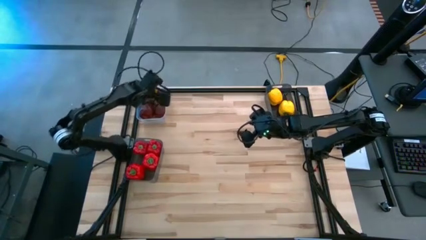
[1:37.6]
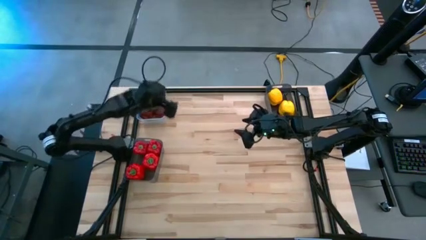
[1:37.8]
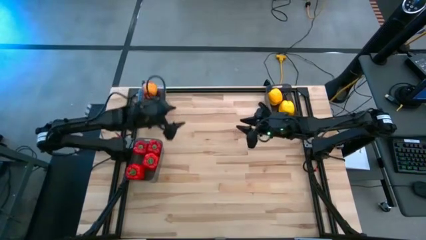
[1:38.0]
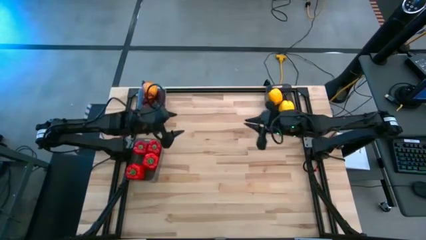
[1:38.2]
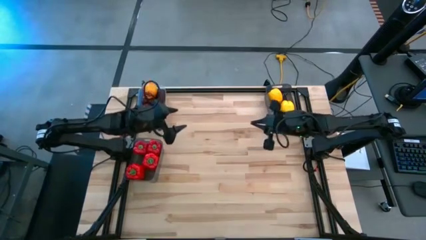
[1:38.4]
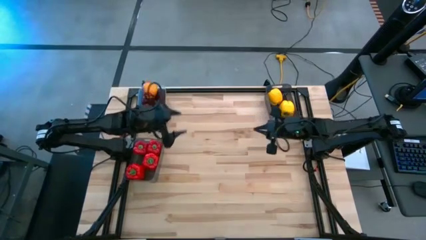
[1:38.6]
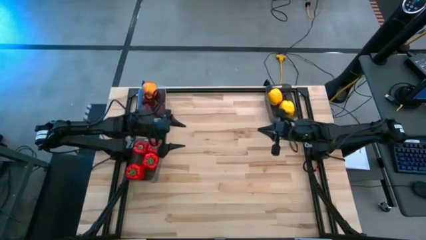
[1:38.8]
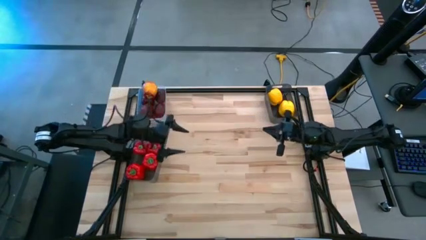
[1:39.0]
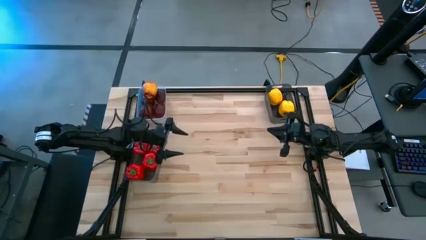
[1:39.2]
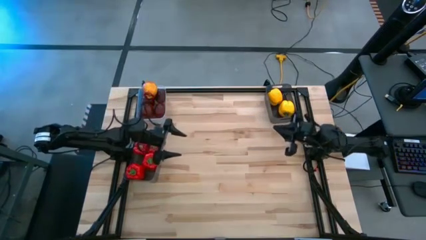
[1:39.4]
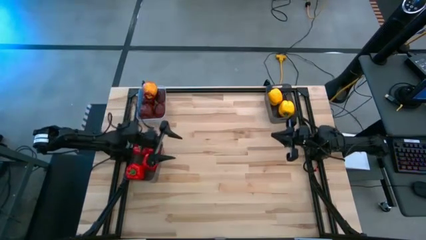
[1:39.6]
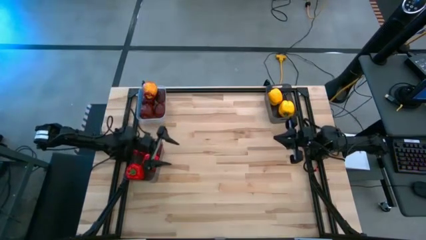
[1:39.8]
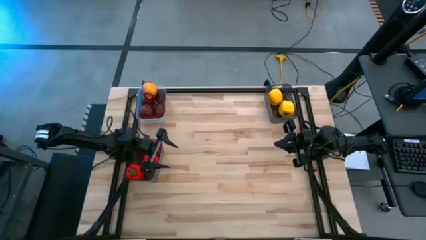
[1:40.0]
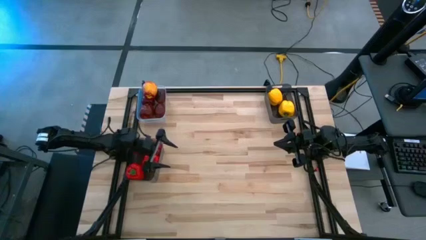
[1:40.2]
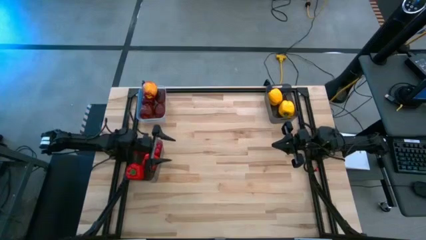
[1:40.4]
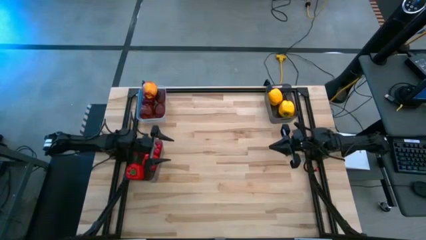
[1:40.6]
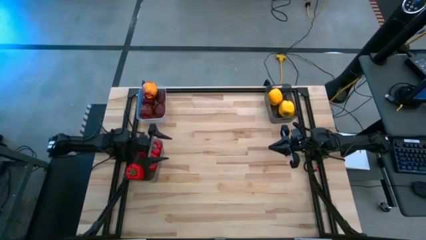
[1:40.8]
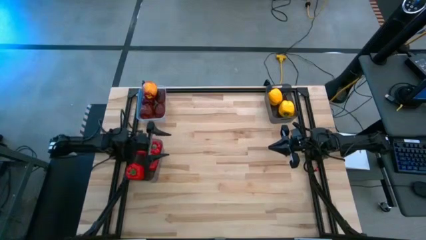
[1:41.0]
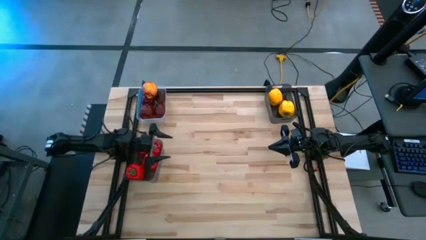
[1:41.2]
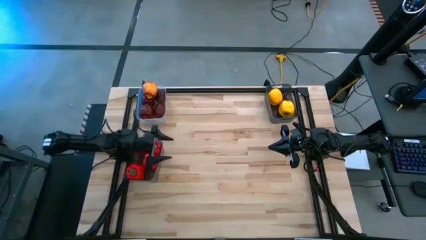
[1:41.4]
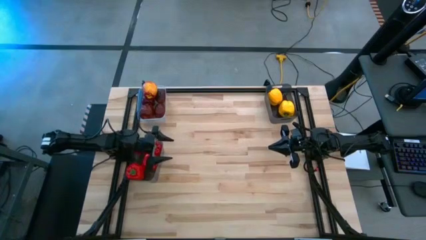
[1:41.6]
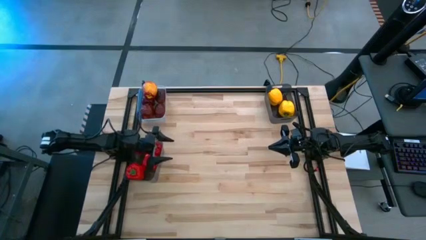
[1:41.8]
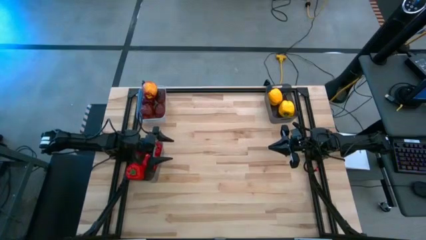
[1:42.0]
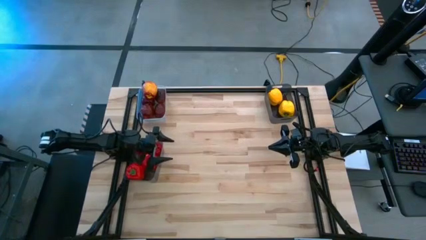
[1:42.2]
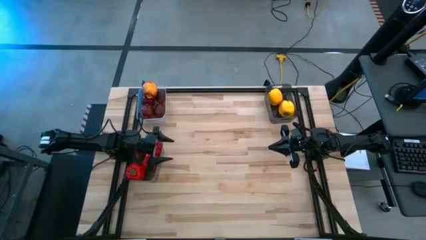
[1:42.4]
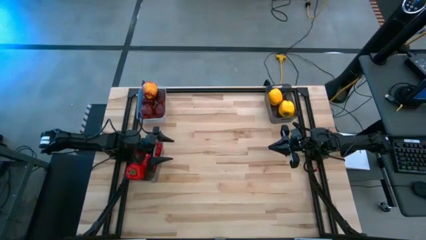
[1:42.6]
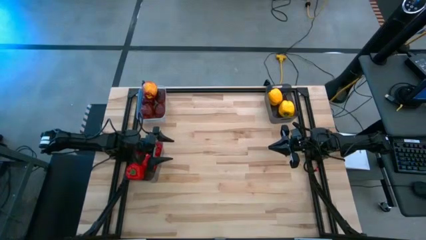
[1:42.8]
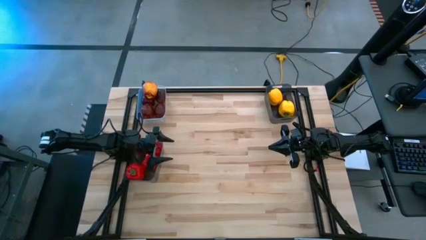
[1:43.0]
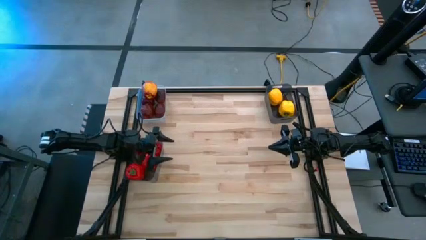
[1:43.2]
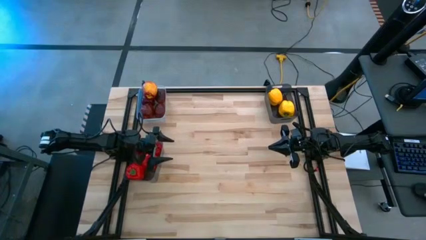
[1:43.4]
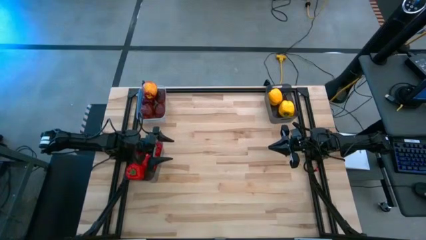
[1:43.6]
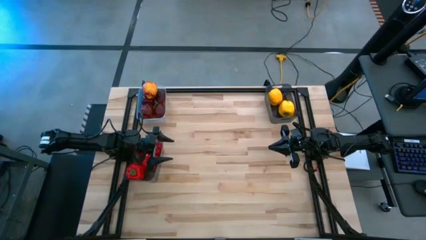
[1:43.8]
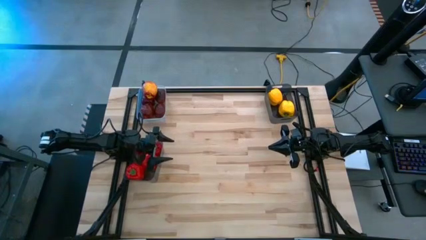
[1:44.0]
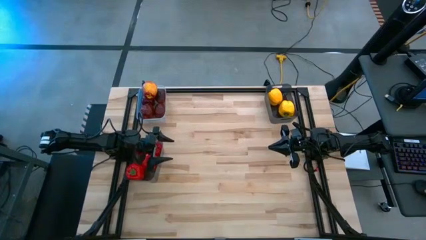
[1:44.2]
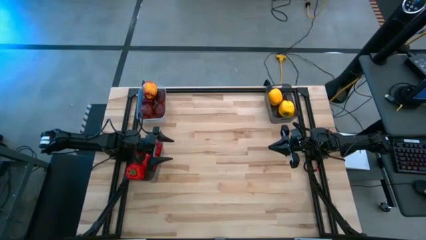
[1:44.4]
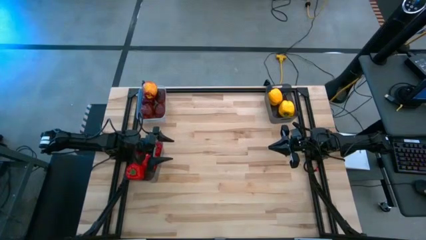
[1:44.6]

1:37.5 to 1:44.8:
Task: Sort produce into baskets
Return to Home Position

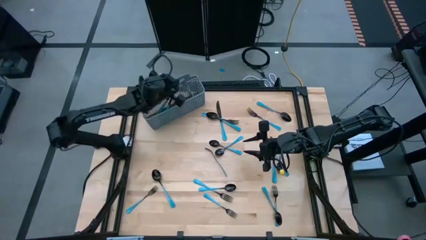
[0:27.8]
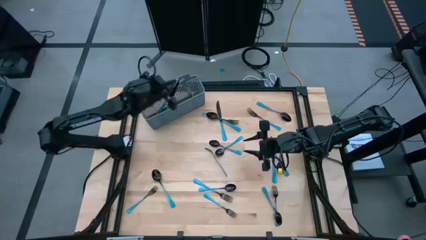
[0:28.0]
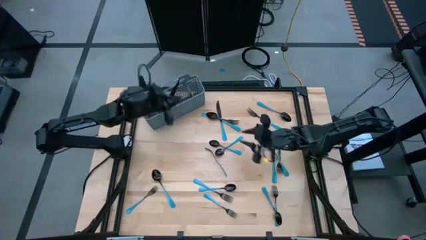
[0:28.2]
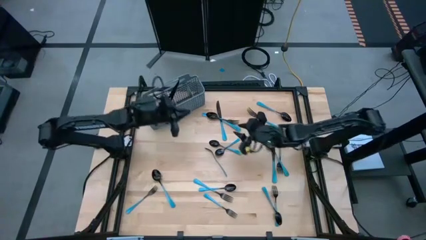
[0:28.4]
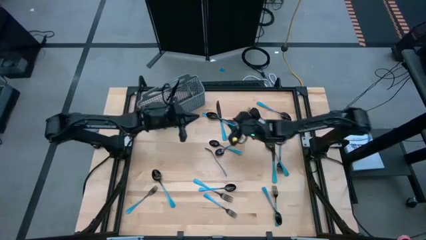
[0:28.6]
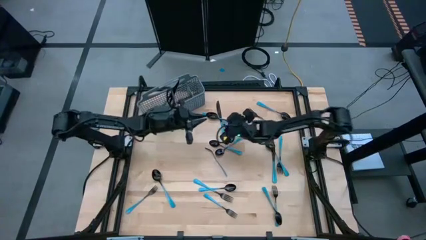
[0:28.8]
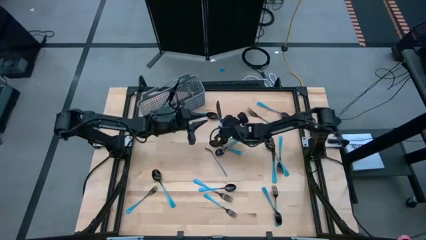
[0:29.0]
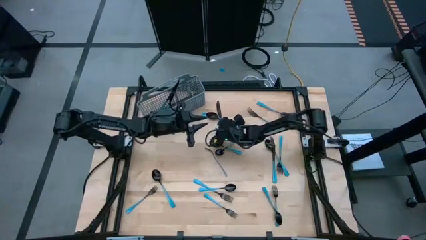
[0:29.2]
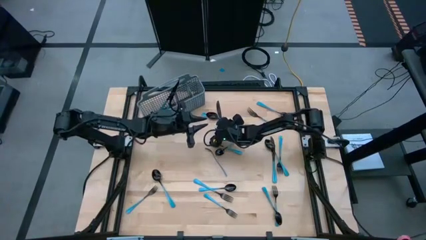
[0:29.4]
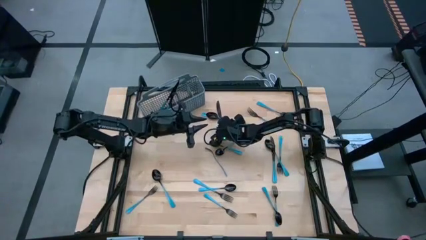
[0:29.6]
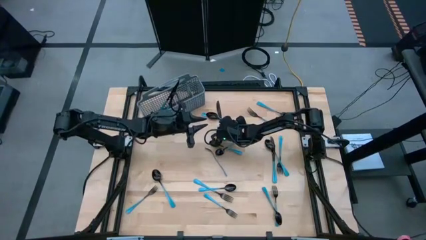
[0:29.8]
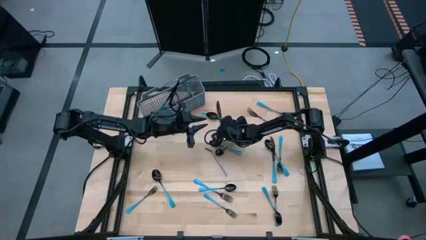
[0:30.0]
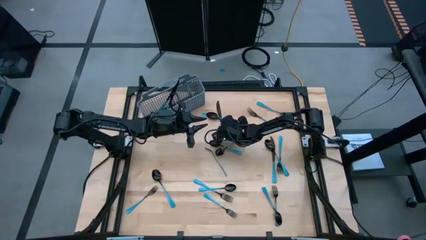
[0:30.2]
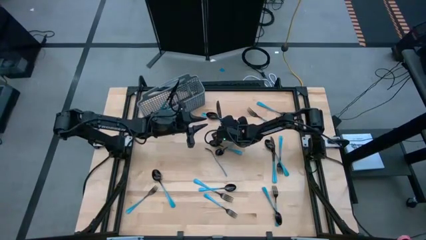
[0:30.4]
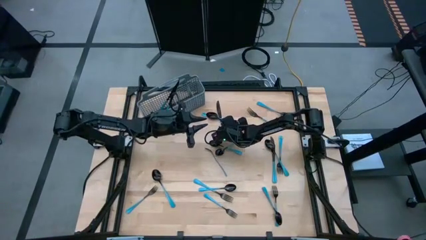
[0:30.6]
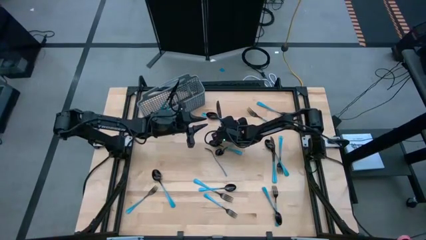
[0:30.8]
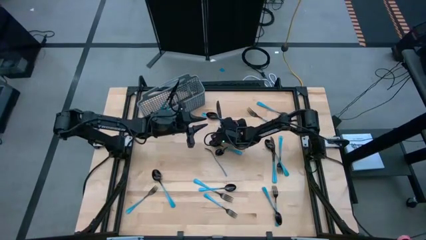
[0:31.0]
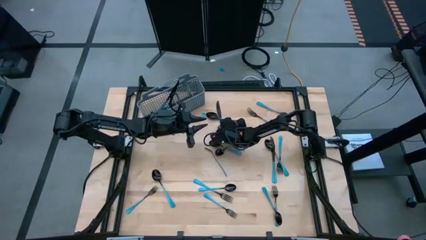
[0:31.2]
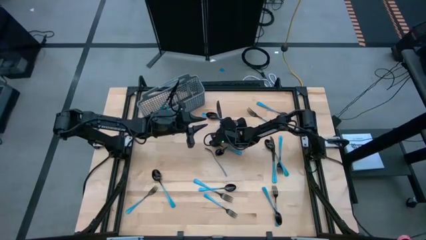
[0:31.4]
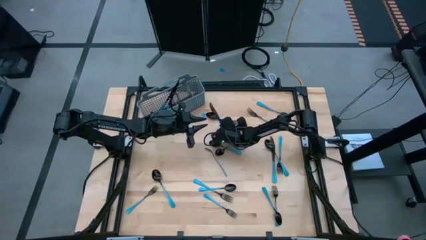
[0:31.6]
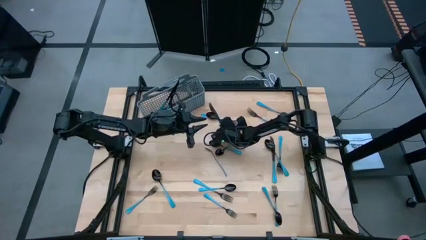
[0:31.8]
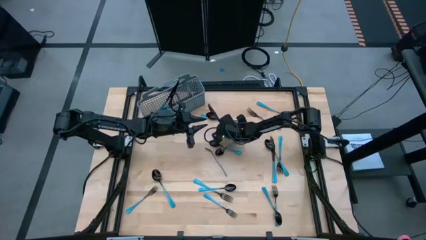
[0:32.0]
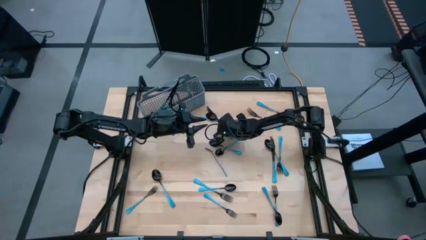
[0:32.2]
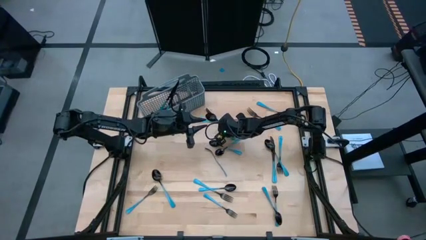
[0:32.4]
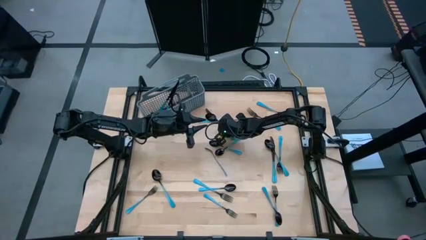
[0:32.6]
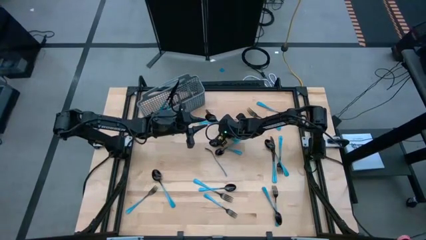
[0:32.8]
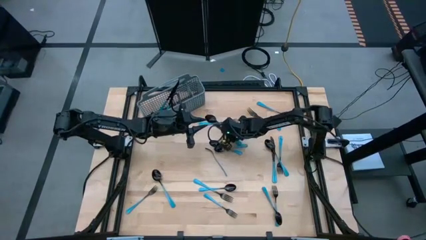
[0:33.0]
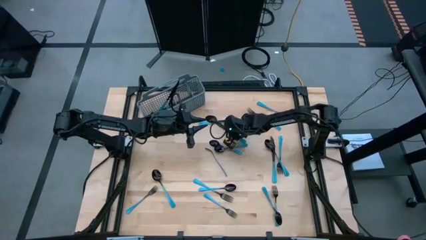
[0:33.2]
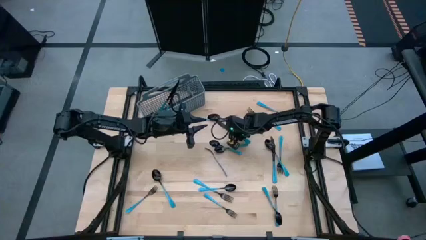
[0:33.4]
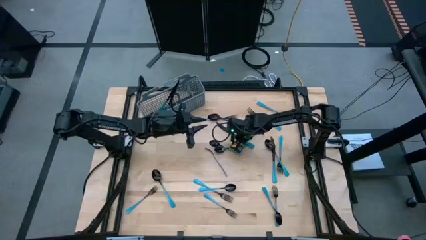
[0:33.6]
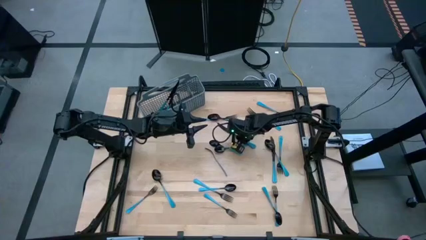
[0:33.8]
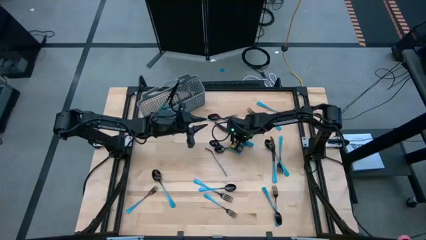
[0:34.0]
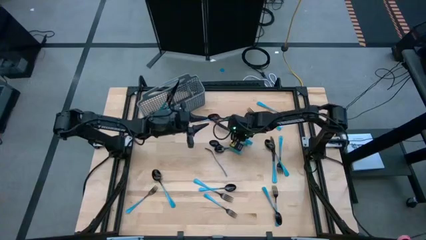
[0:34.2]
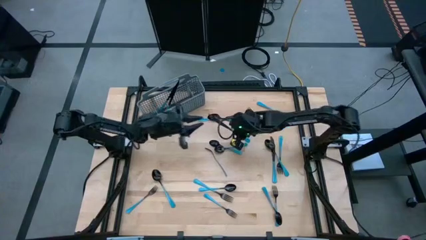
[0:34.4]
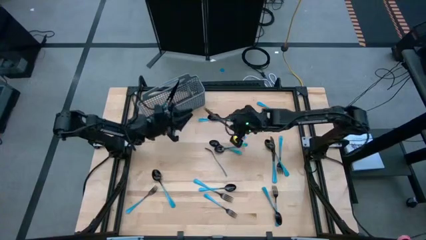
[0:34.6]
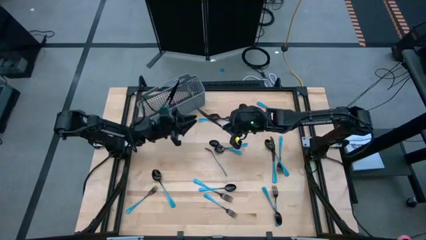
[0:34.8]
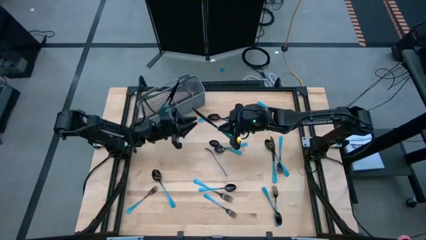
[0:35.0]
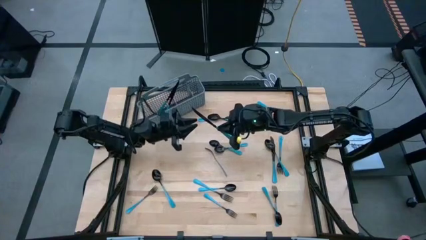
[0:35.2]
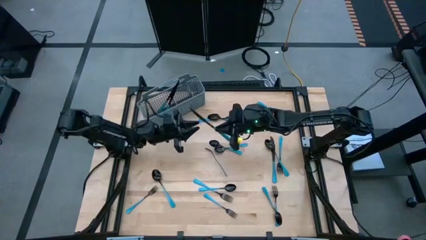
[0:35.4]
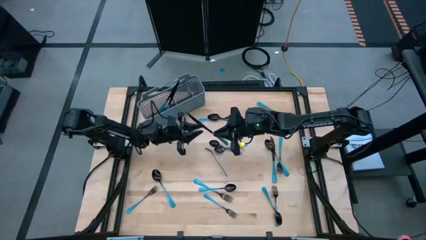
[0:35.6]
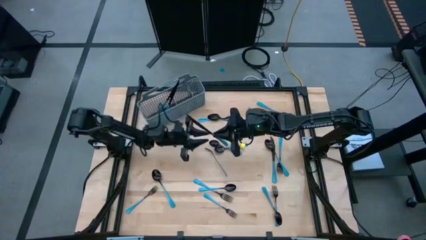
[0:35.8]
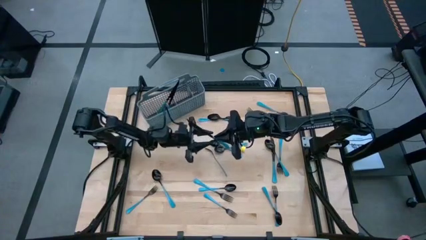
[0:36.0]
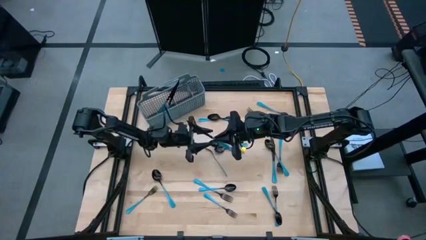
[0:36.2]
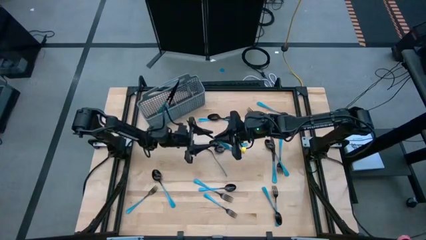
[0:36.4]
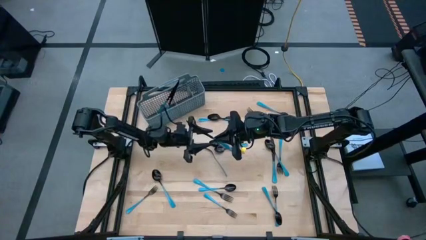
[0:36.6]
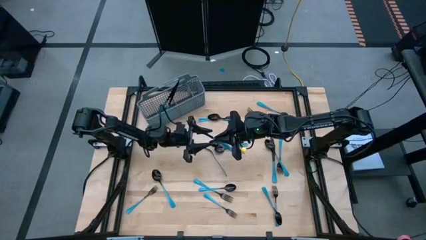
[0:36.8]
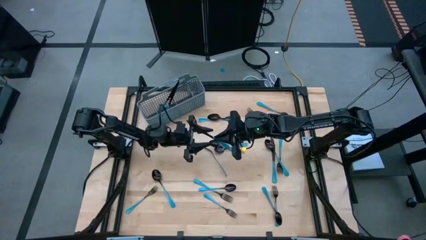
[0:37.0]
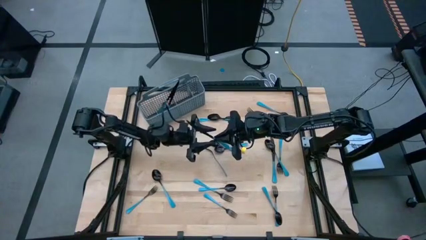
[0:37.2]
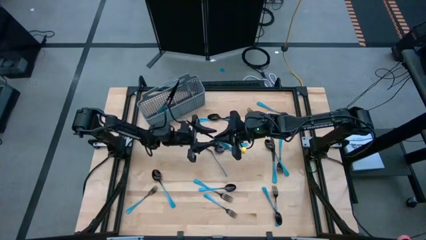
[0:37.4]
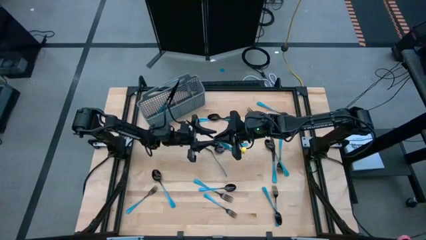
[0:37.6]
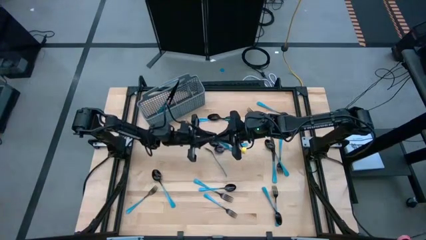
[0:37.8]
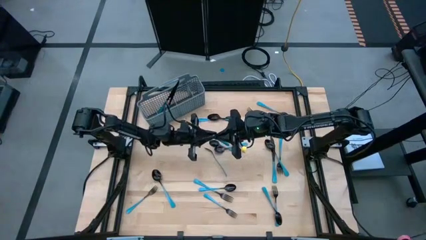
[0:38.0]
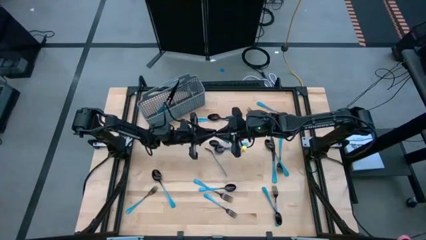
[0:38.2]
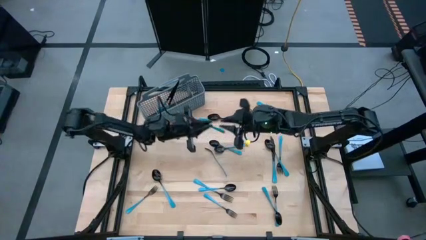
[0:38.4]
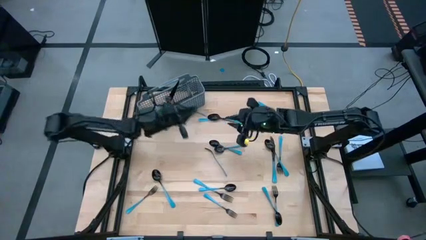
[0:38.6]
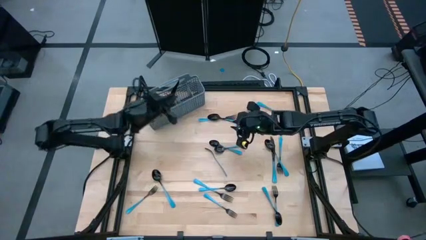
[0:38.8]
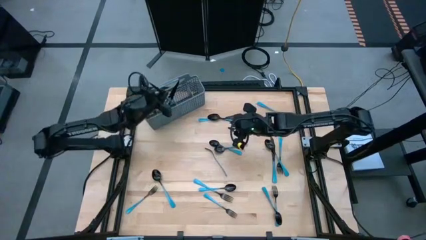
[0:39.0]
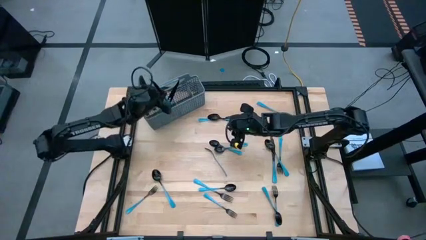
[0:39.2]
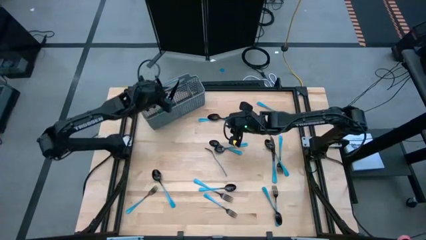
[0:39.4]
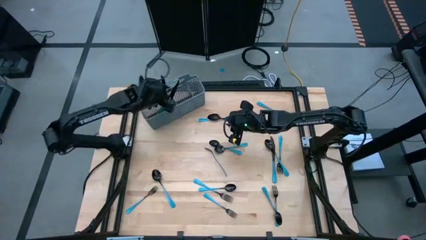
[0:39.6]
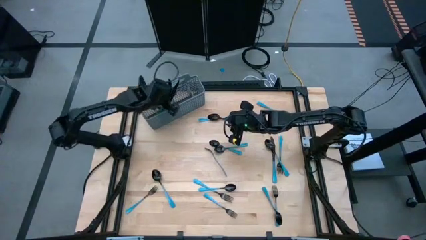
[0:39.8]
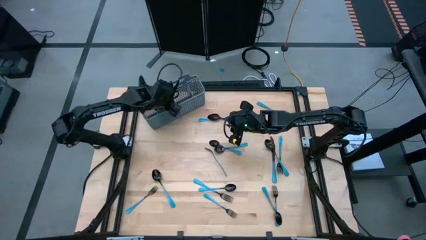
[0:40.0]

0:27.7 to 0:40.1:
Task: Sort silverware
Put the blue knife into the silverware rack
